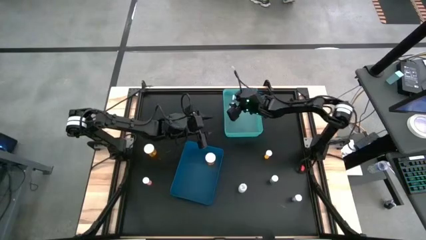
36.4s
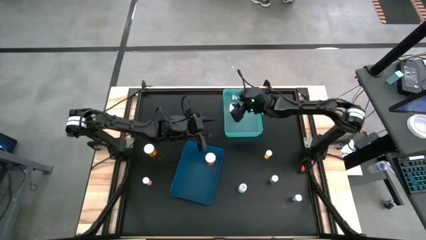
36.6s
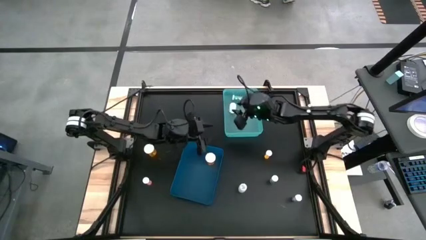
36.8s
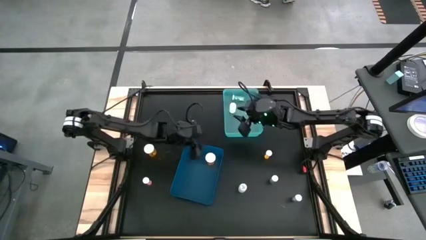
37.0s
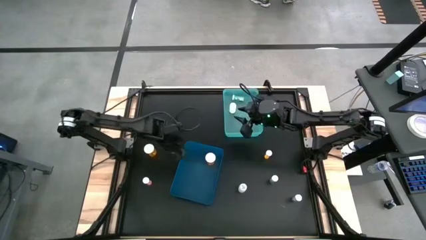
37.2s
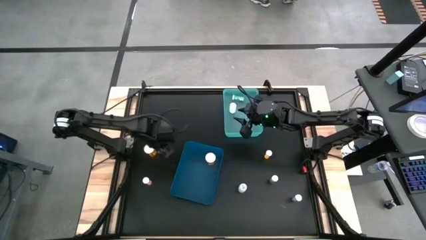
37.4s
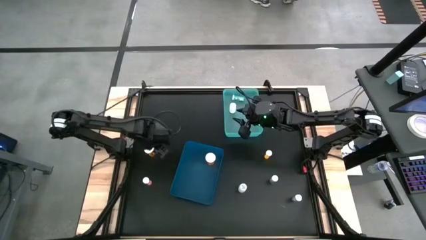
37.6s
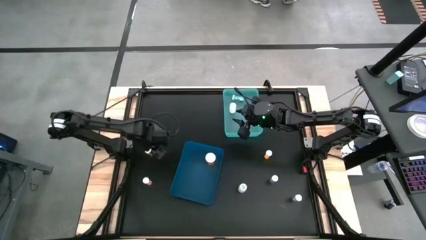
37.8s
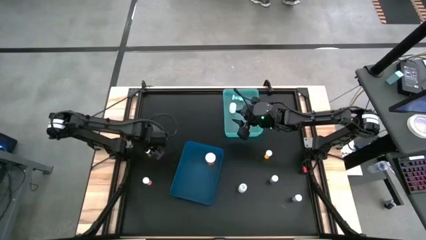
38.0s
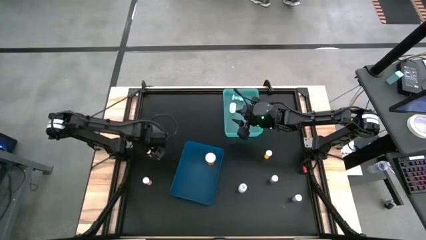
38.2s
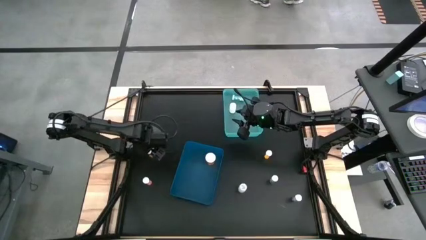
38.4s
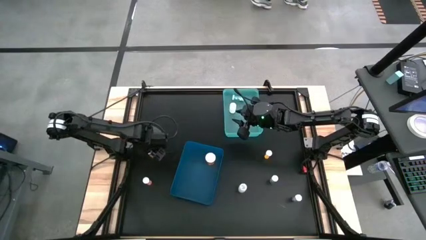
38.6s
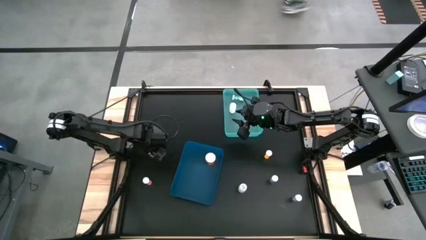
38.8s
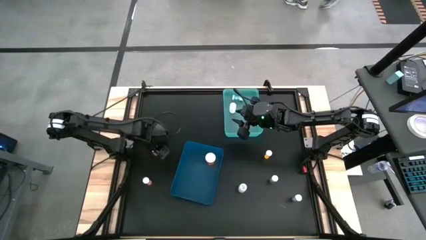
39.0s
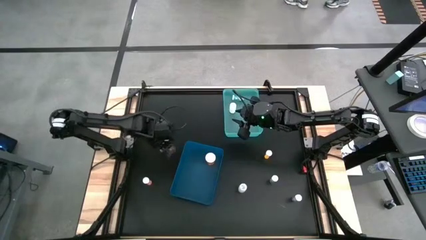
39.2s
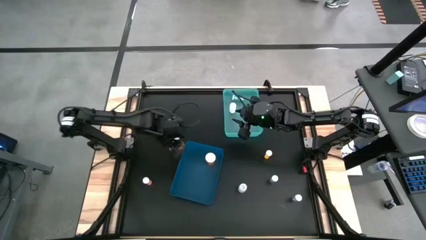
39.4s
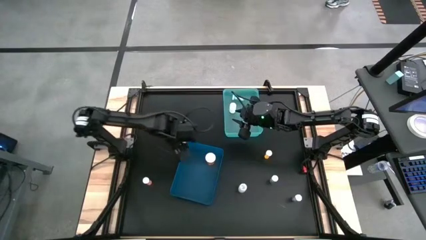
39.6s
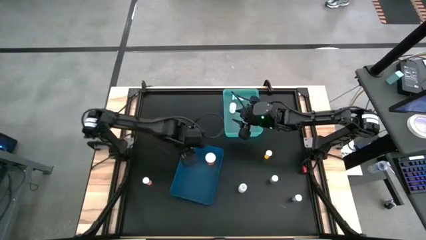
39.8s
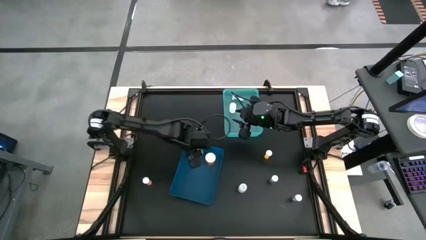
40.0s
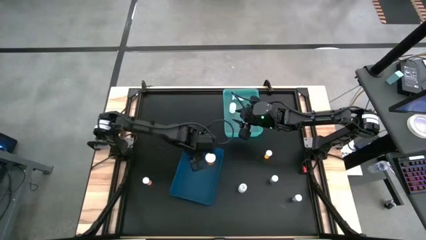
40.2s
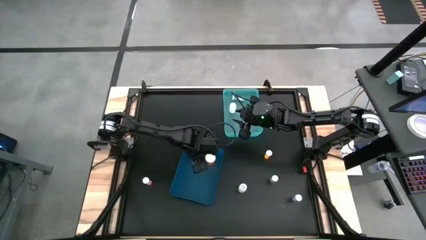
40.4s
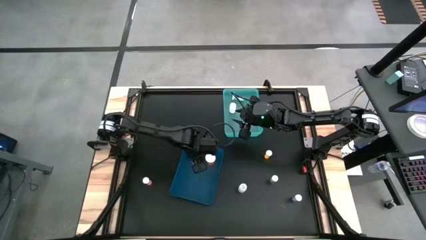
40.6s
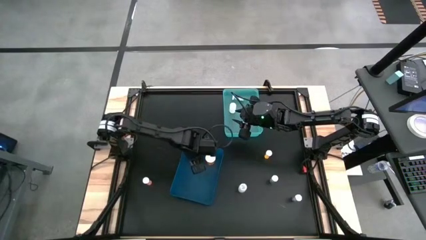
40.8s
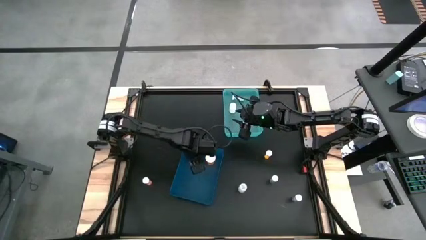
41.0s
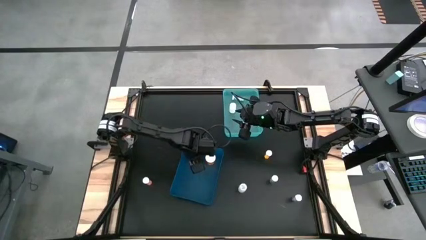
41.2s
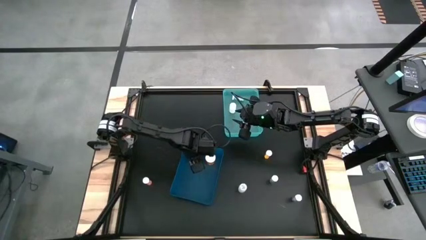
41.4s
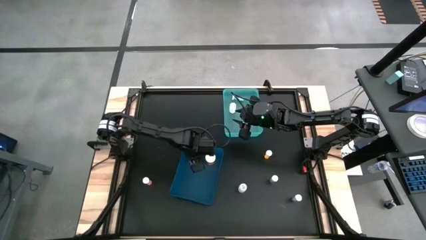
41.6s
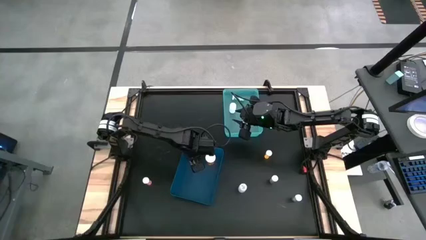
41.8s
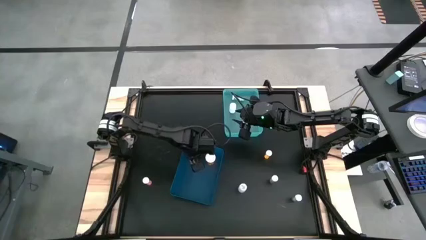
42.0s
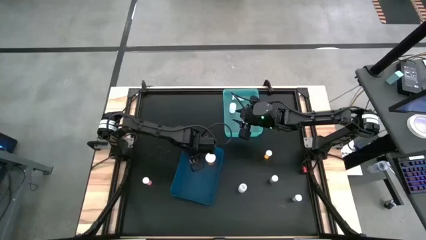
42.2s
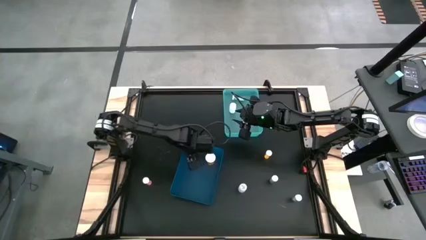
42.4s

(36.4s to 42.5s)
Task: Pick and place medicine bottles into bin by pill shape (circle, oval)
Put the orange capsule bottle into the blue bin

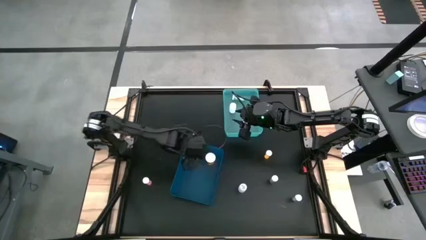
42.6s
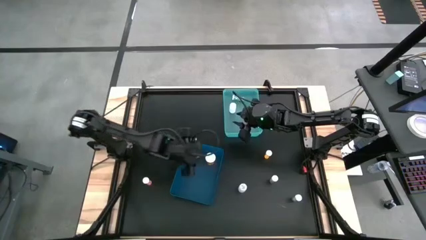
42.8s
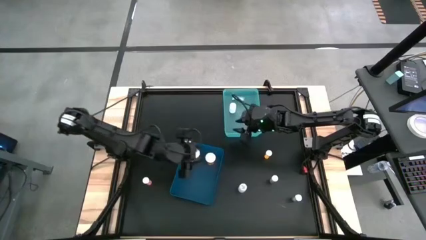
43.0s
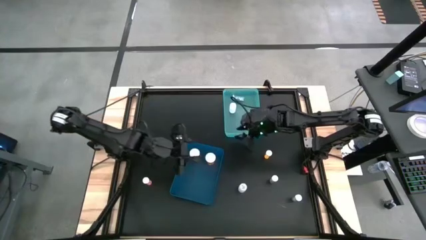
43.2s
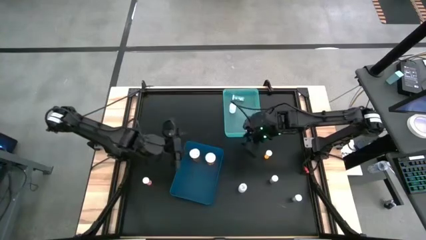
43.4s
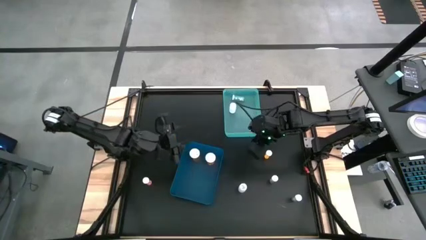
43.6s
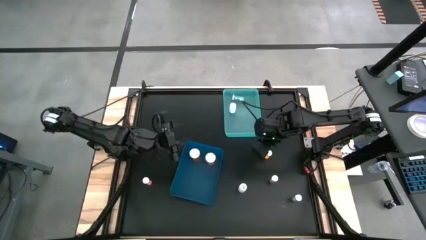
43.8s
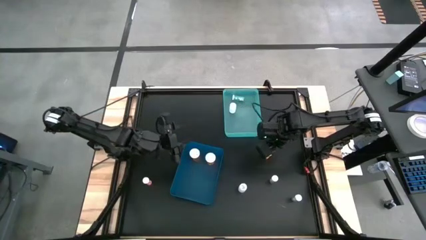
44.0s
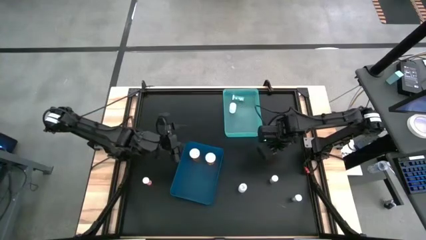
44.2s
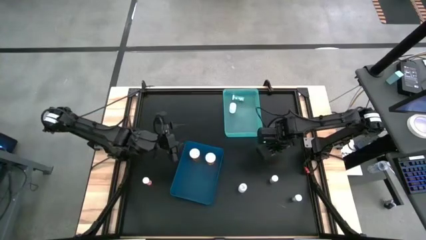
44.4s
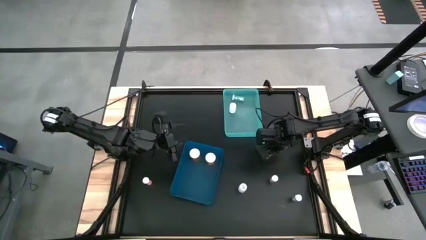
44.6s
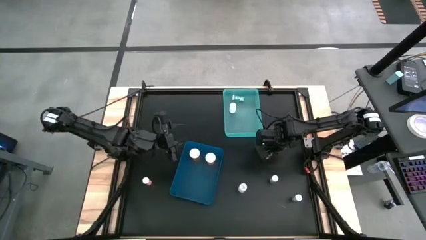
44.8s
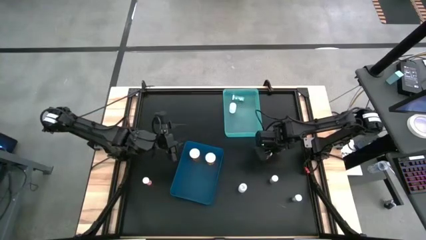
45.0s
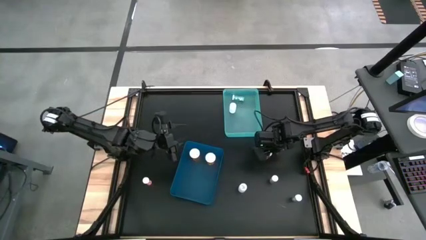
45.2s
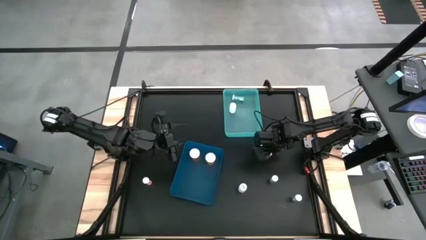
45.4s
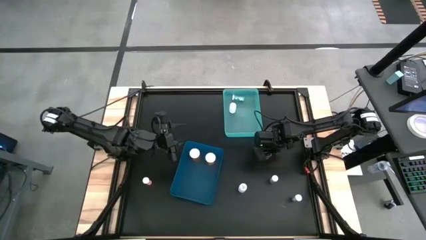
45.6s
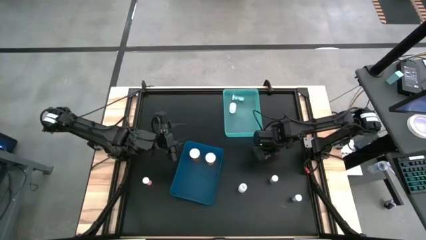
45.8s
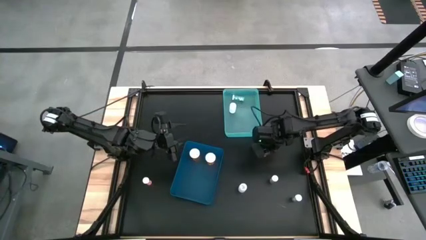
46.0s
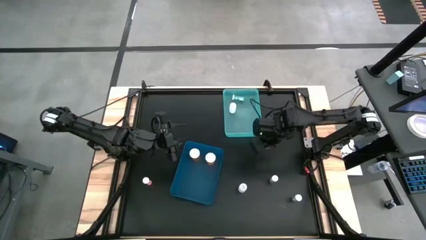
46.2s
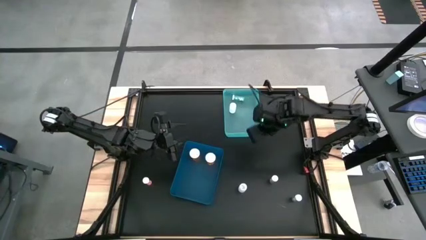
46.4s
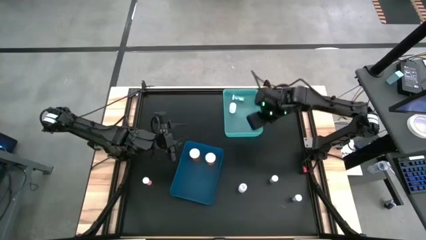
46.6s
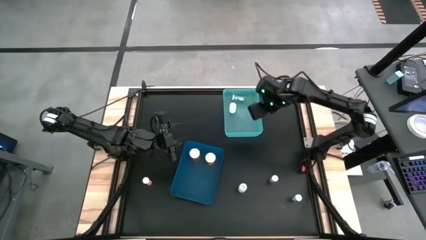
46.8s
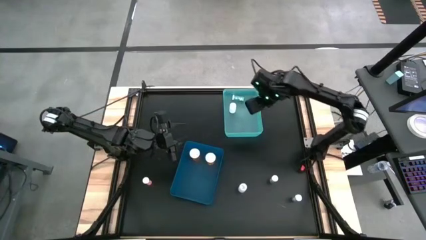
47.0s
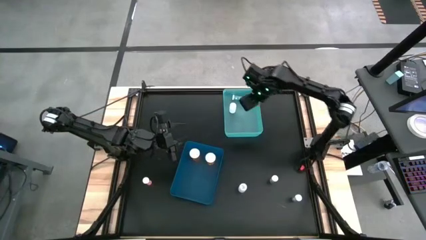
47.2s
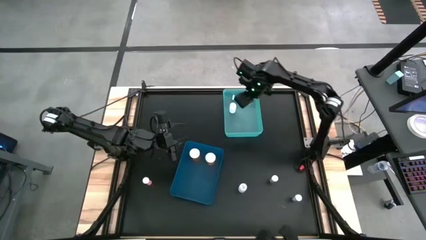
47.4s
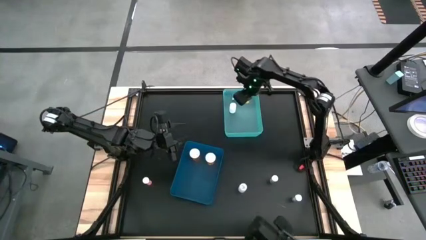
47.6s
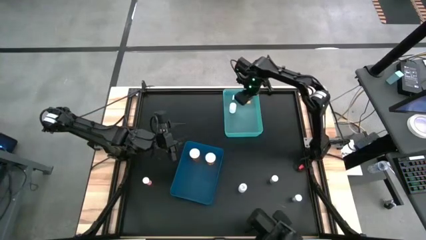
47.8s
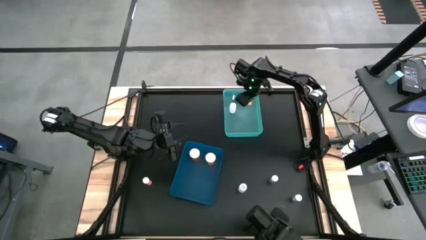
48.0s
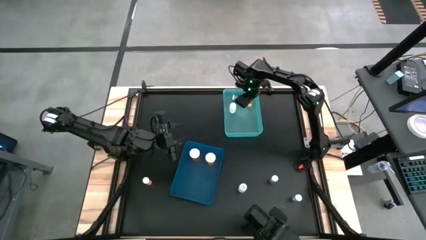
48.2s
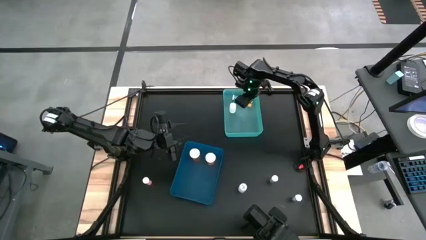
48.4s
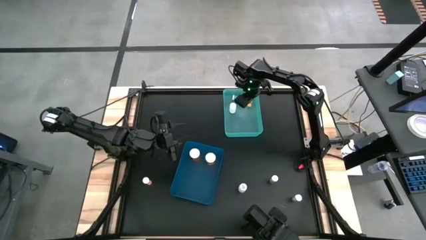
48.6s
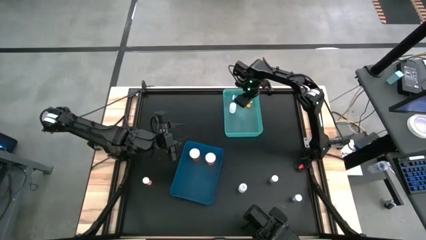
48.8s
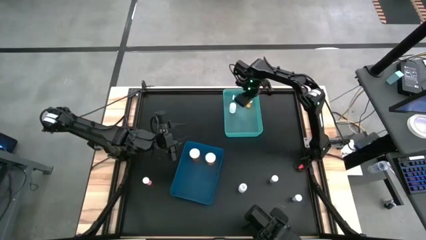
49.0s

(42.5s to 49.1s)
Put the orange tablet bottle into the green bin

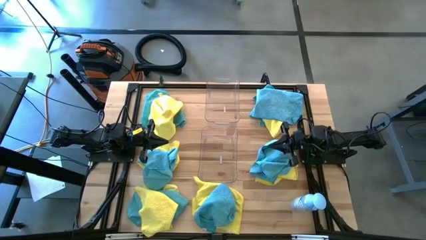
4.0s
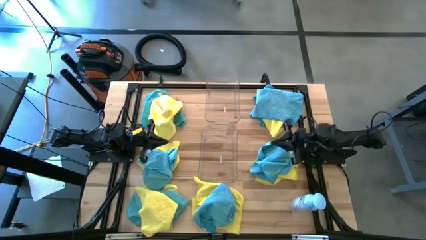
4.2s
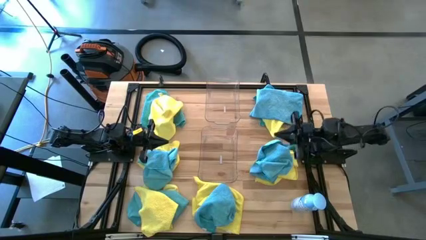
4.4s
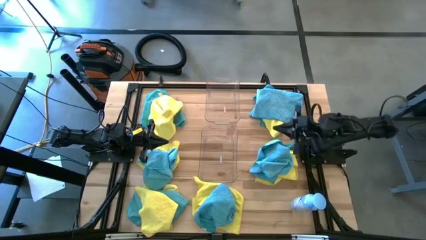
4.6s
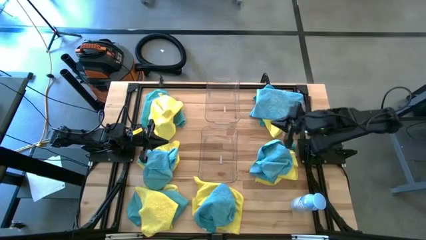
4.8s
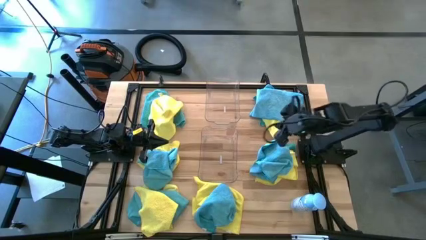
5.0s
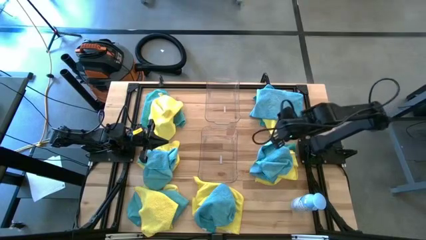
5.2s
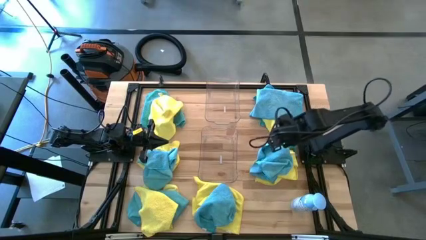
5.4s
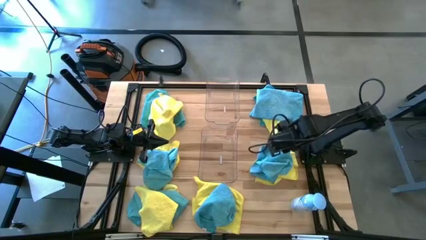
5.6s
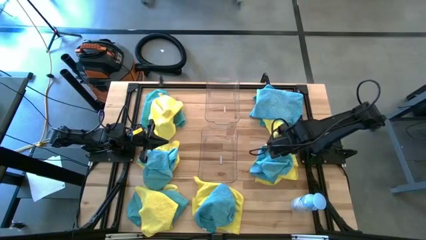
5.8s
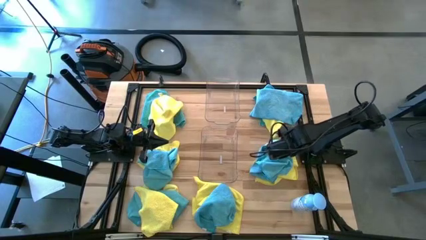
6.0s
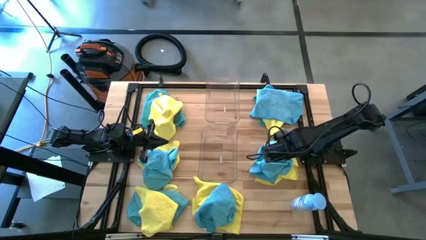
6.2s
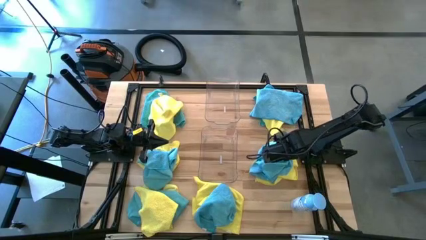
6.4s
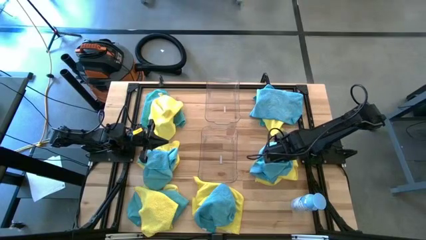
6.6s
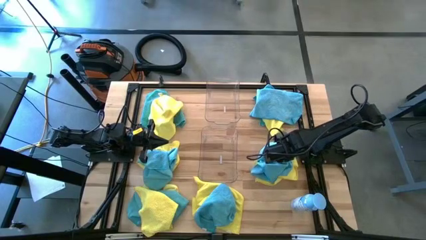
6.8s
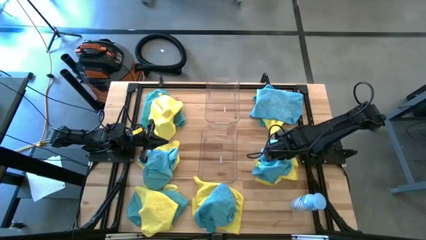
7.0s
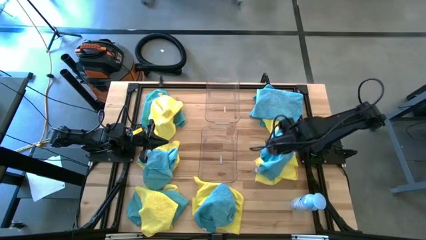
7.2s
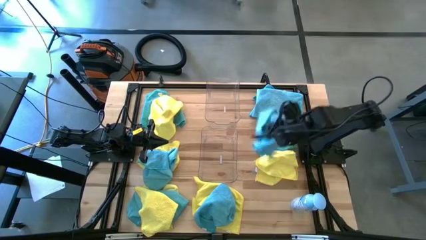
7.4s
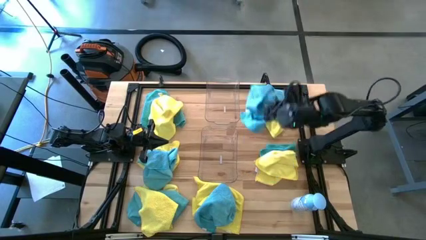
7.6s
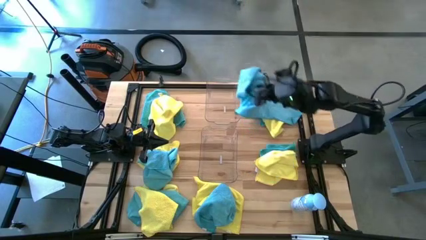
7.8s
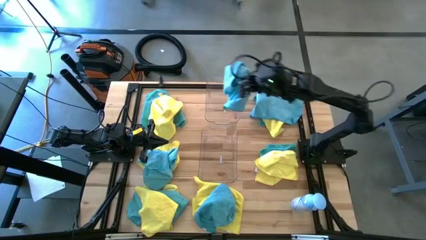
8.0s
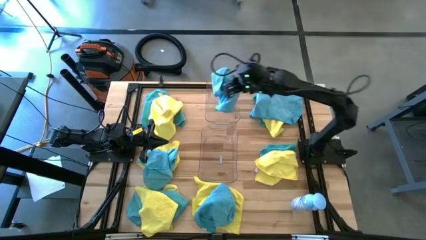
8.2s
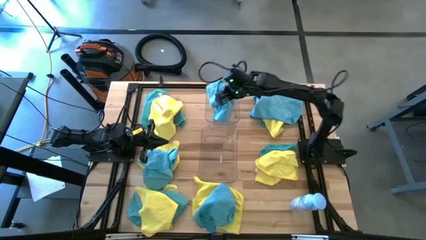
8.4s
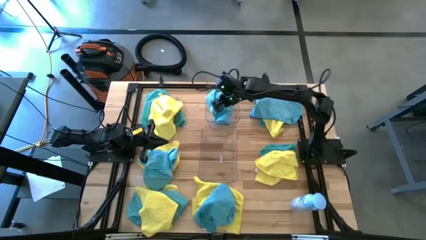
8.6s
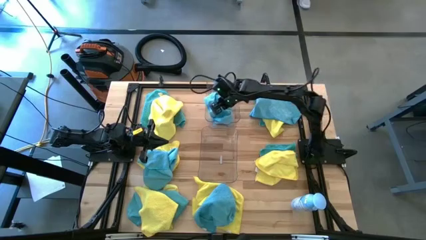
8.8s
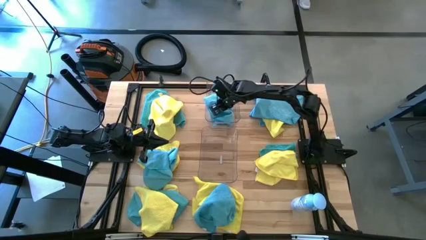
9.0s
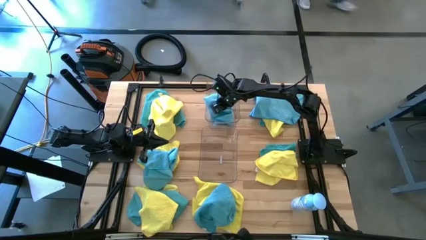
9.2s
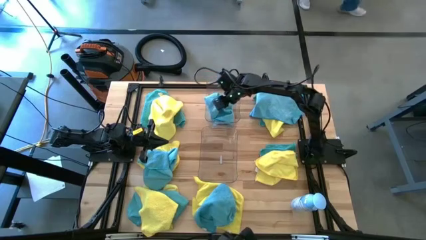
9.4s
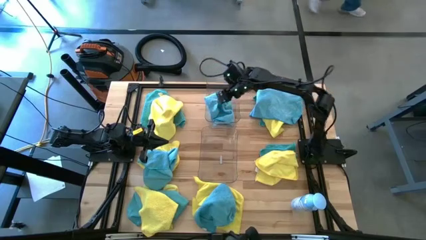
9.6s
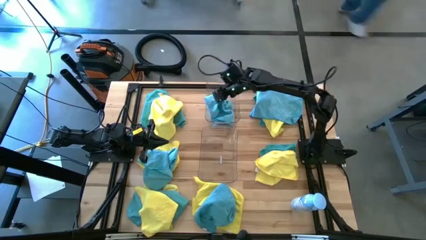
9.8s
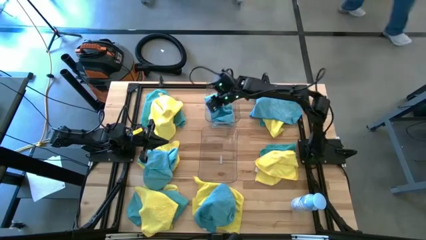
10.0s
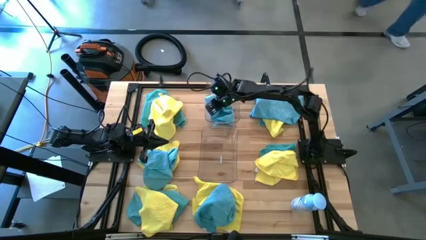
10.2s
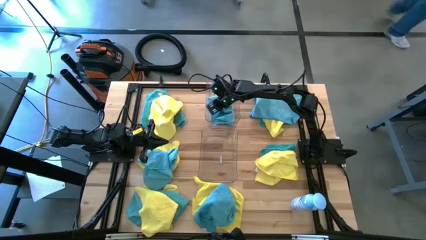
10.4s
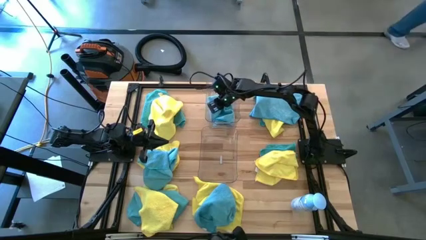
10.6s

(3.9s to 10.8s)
Task: Sort microfiber towel by color & place in baskets
Put the blue microfiber towel into the top transparent bin
